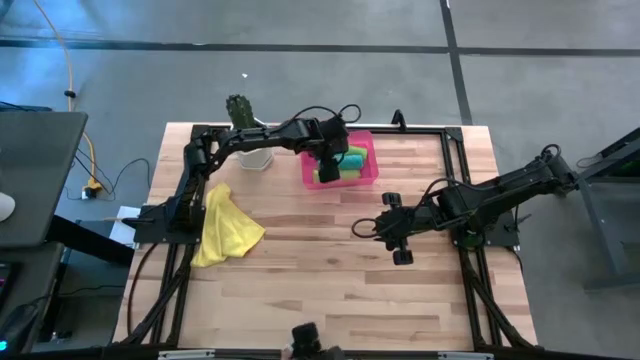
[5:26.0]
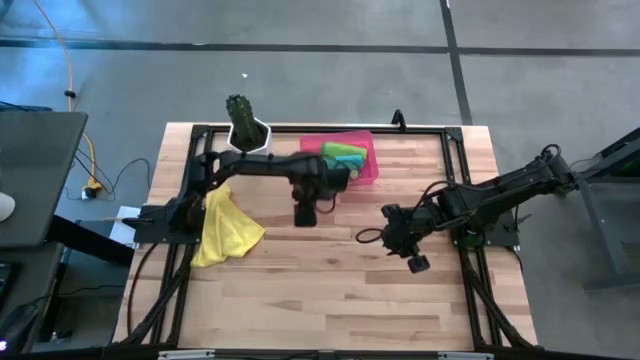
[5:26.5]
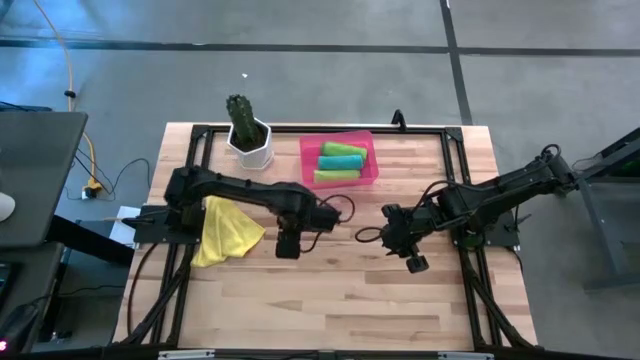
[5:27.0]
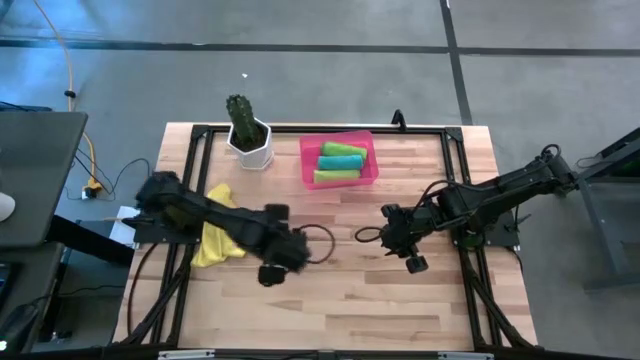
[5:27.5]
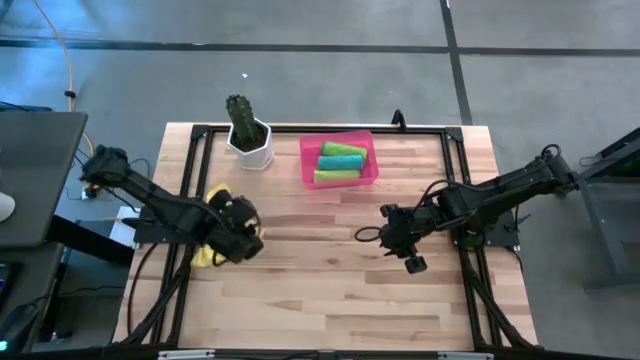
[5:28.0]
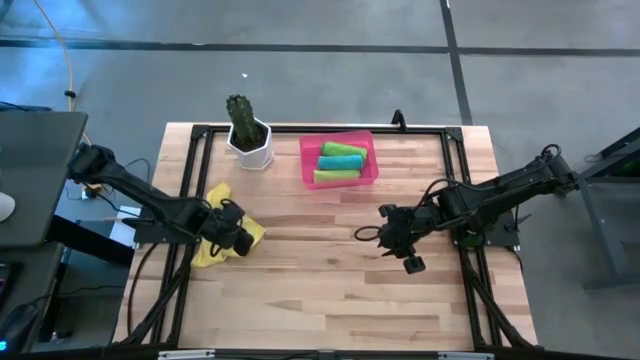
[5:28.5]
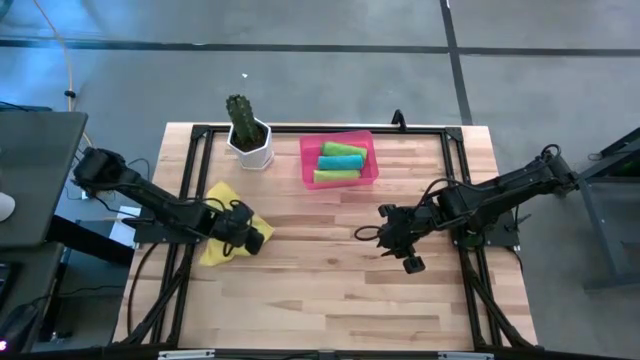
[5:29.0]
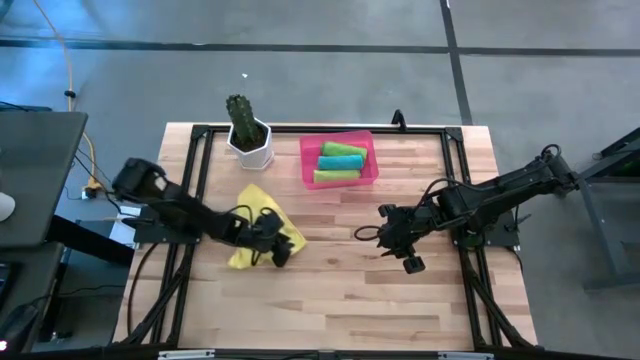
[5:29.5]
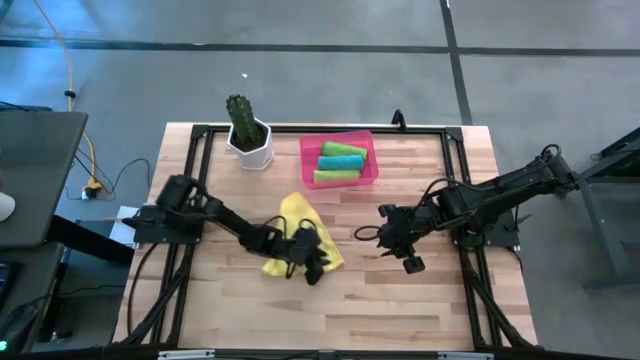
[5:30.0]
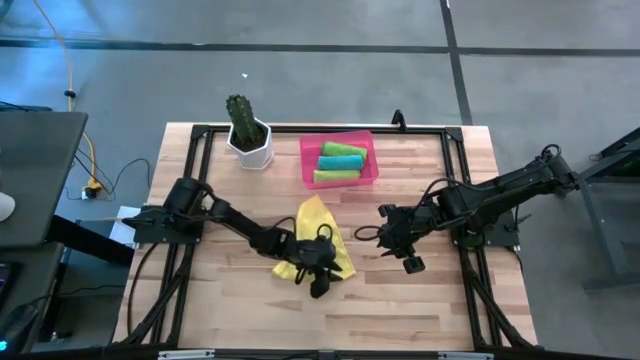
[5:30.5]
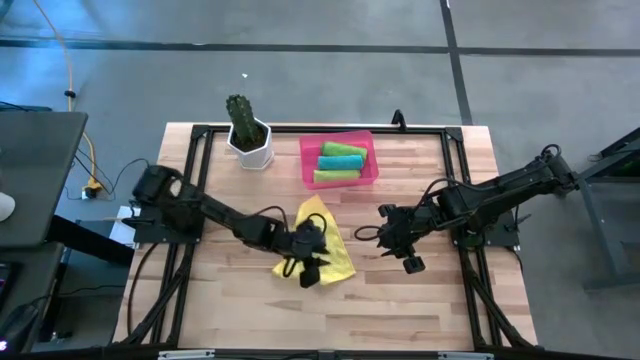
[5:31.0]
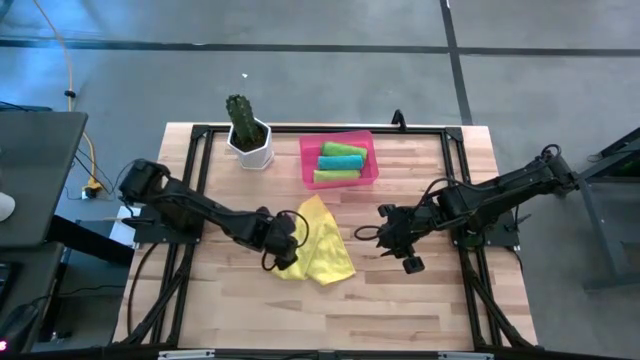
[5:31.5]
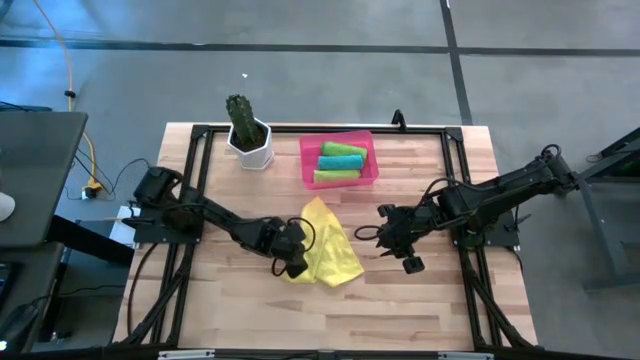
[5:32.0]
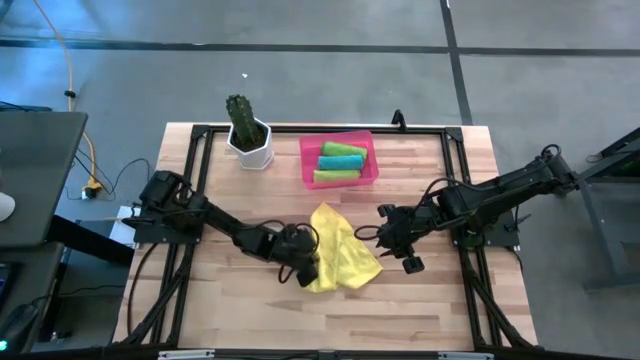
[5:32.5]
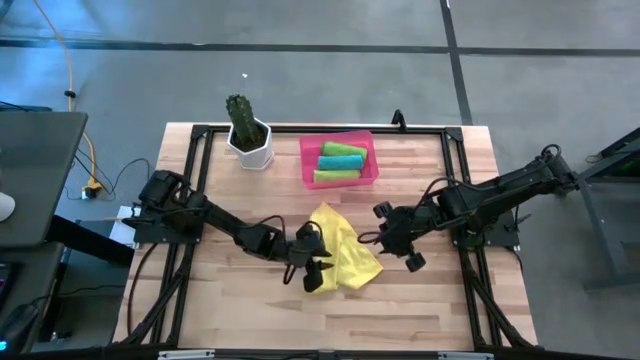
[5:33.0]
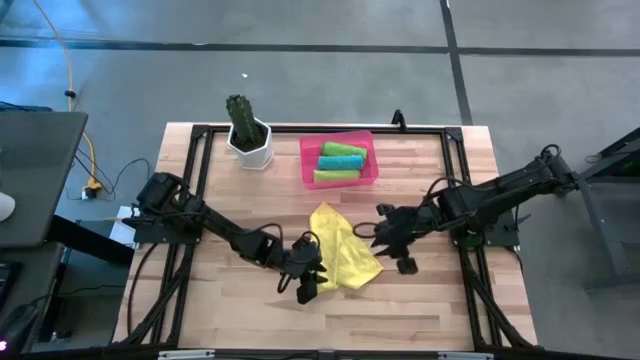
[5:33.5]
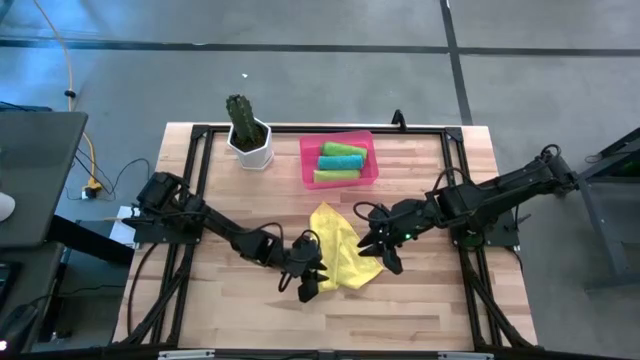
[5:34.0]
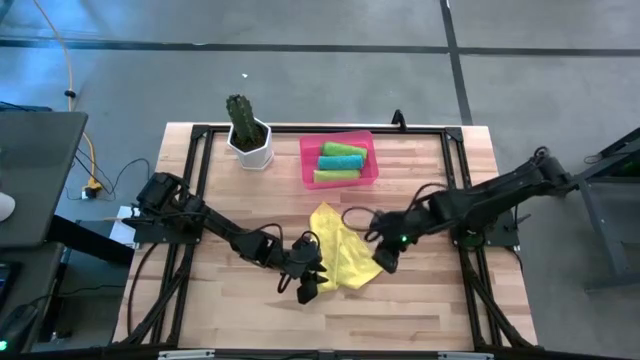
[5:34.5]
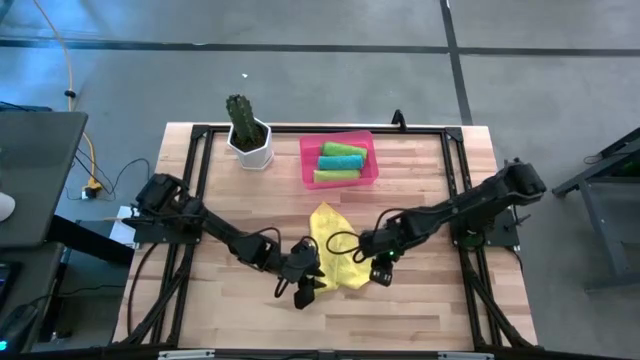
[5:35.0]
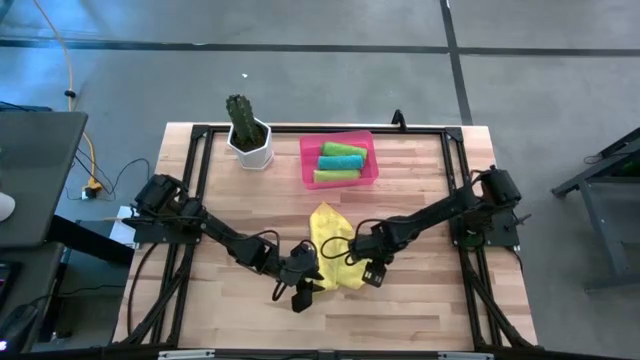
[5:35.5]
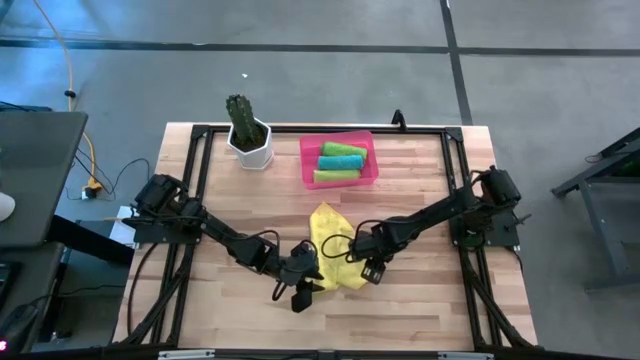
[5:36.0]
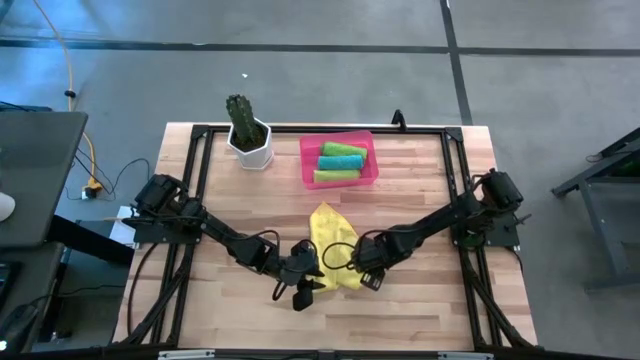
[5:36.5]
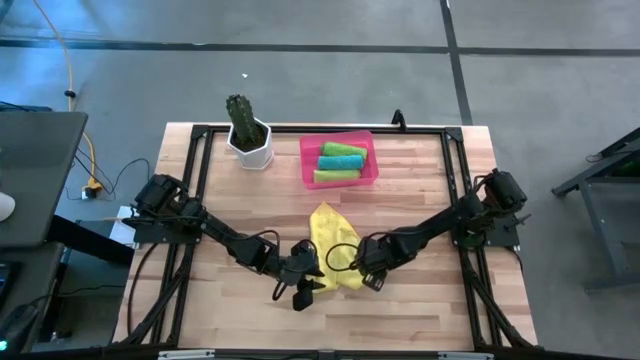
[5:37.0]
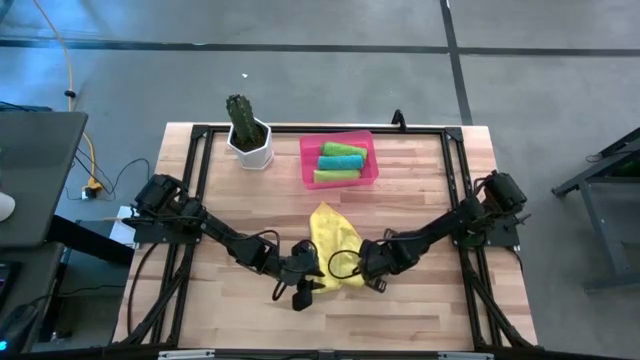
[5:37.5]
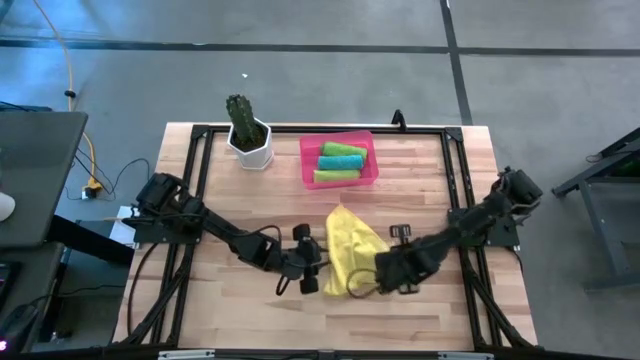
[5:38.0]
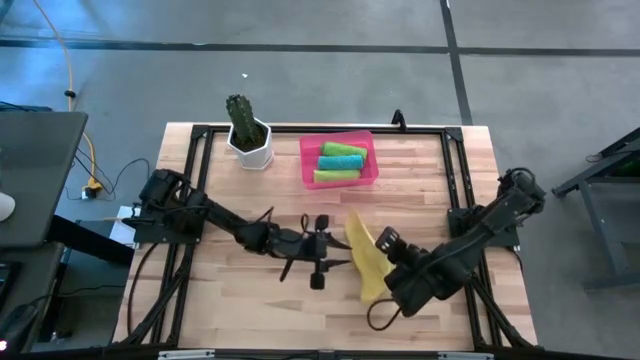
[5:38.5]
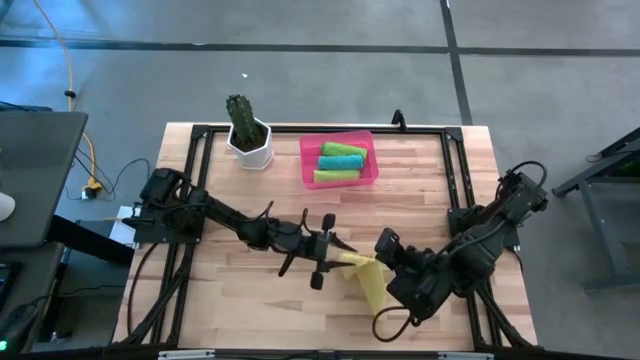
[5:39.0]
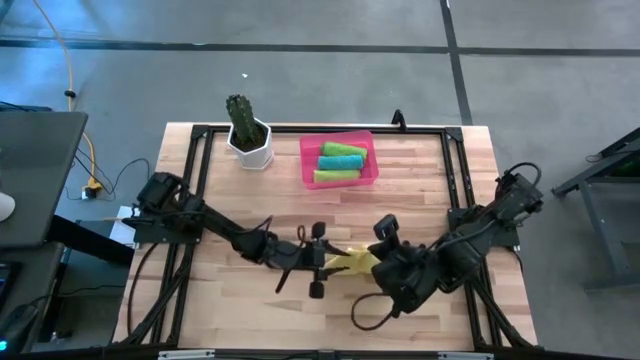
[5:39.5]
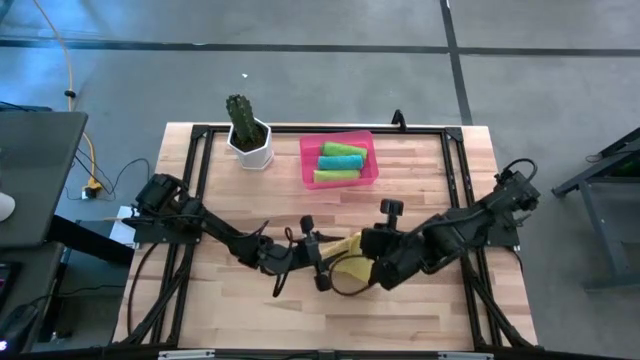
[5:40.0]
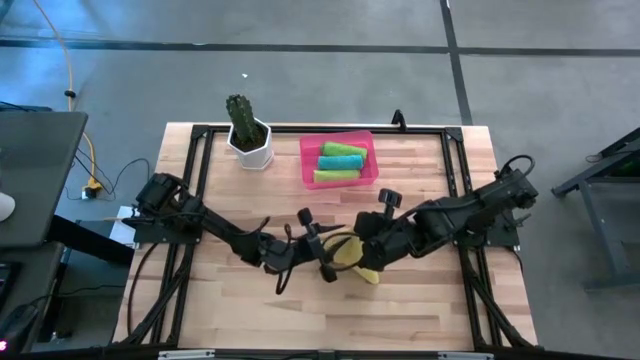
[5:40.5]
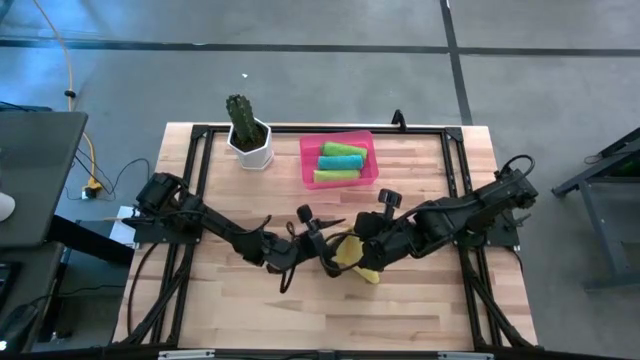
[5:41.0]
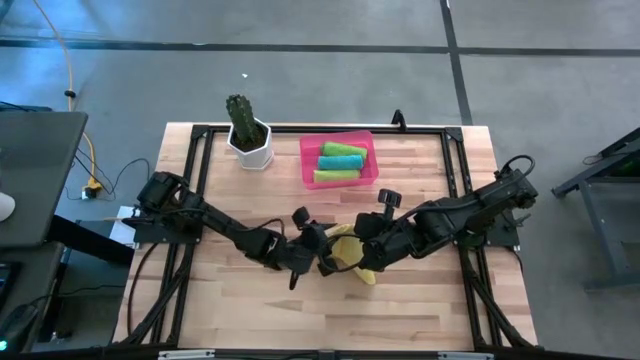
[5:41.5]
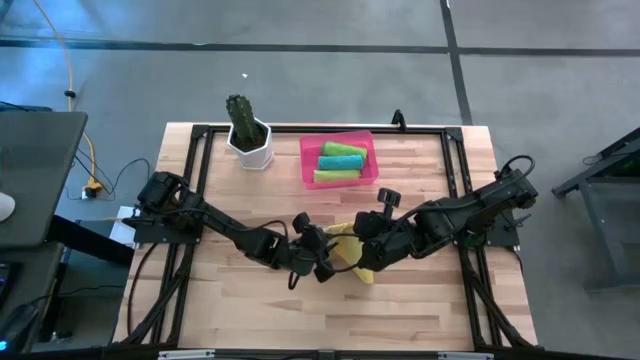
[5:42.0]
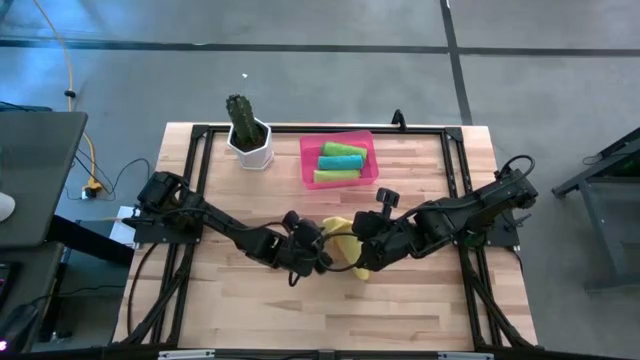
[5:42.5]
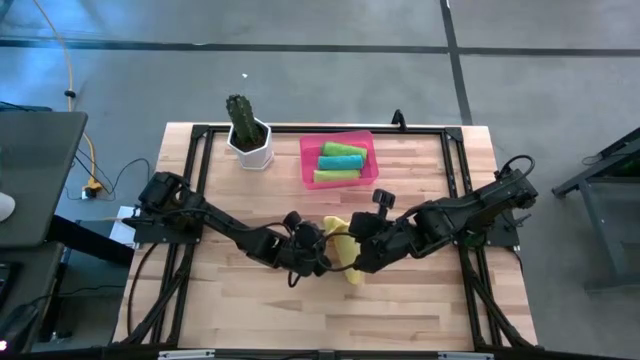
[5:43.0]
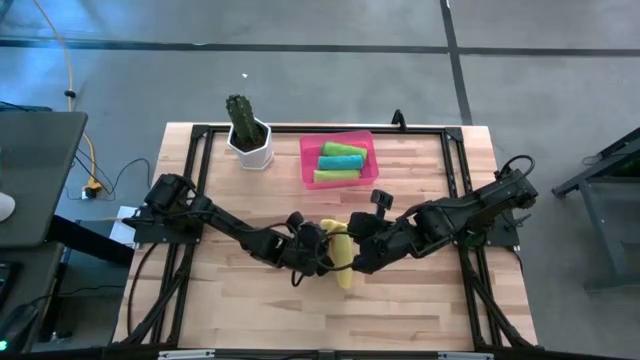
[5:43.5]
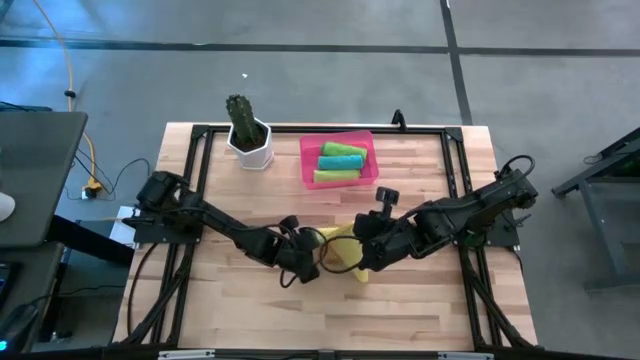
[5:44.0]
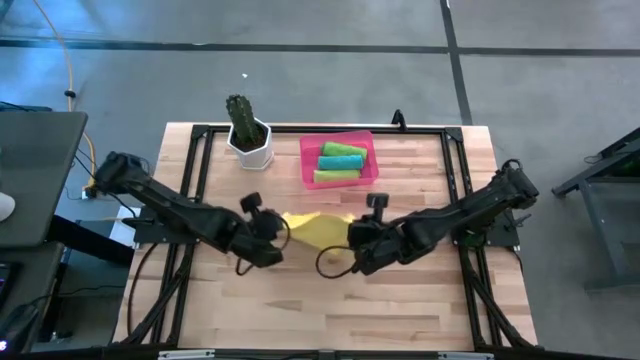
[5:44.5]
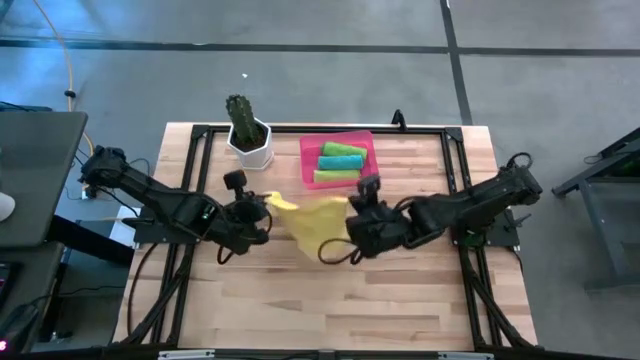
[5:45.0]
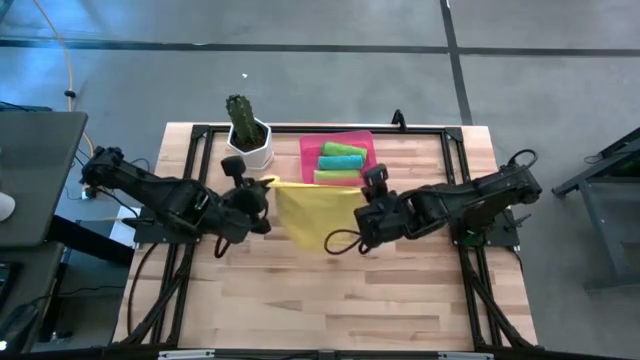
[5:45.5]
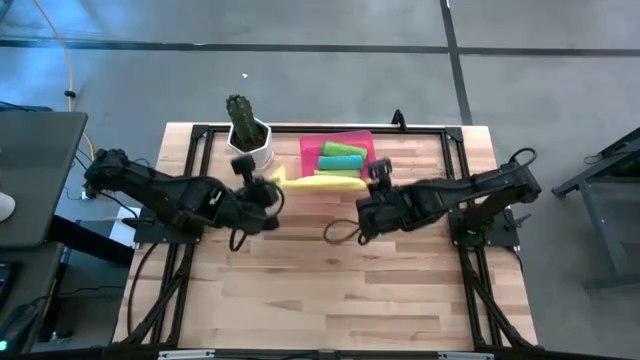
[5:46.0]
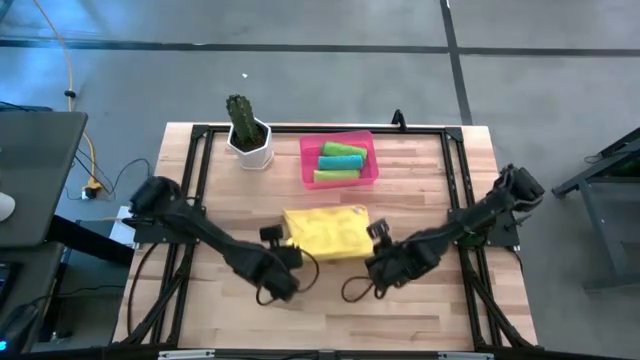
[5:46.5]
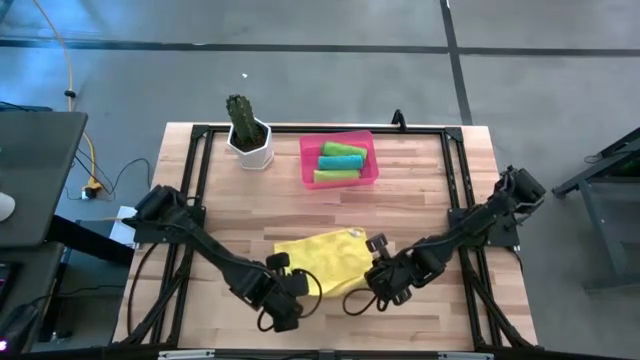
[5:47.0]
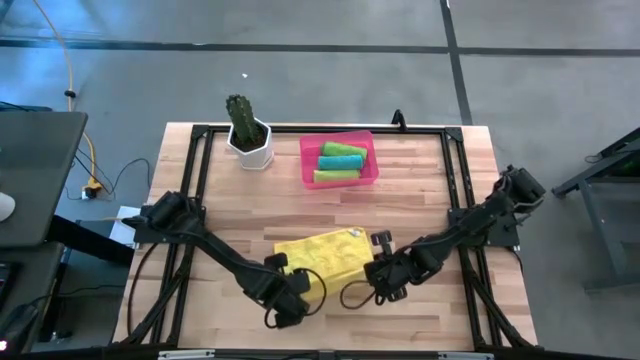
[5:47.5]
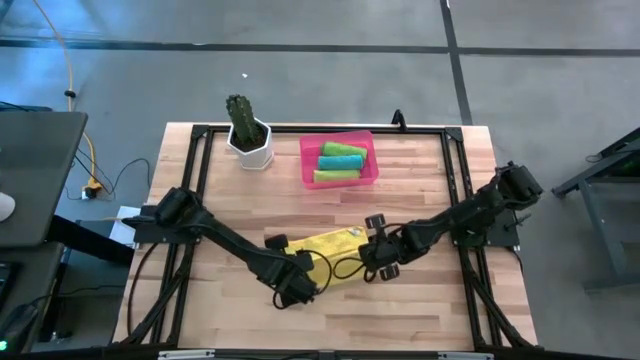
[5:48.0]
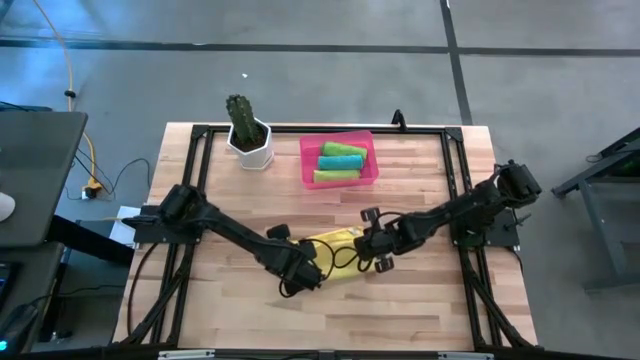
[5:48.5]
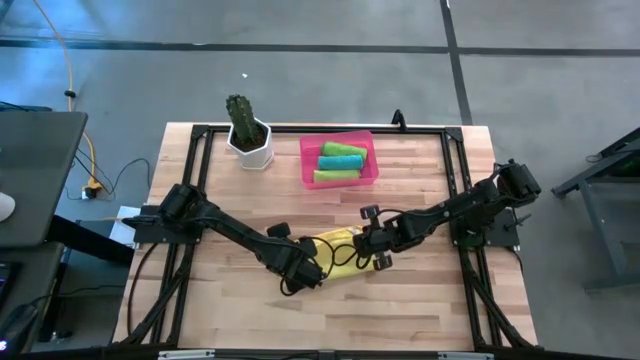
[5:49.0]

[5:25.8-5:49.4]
Task: Roll microfiber towels into tight, uniform cylinder then place into a basket
Roll the yellow microfiber cloth
